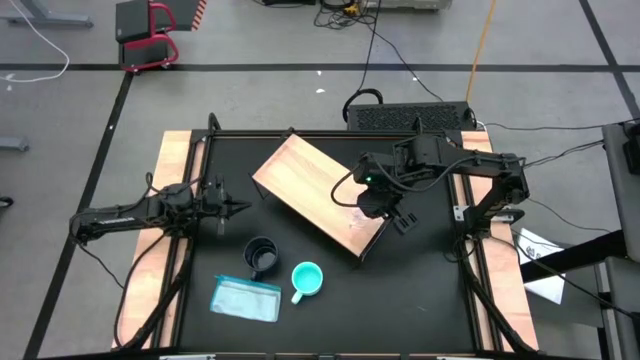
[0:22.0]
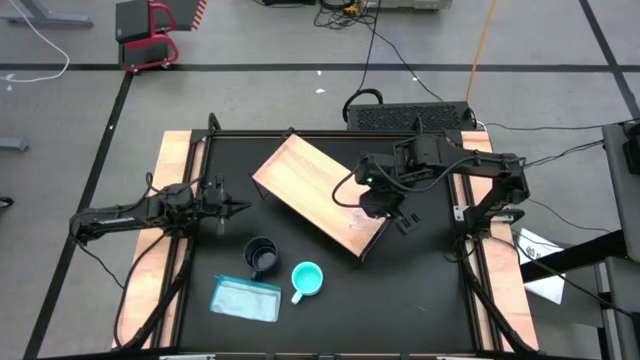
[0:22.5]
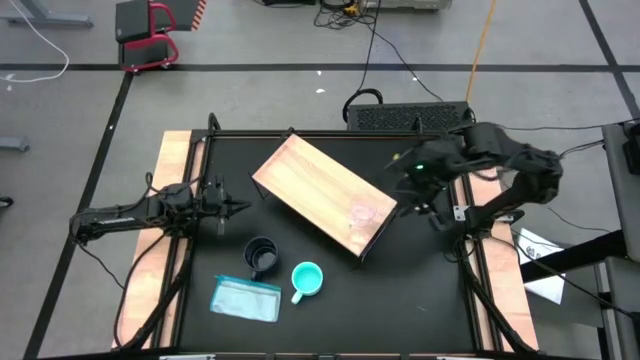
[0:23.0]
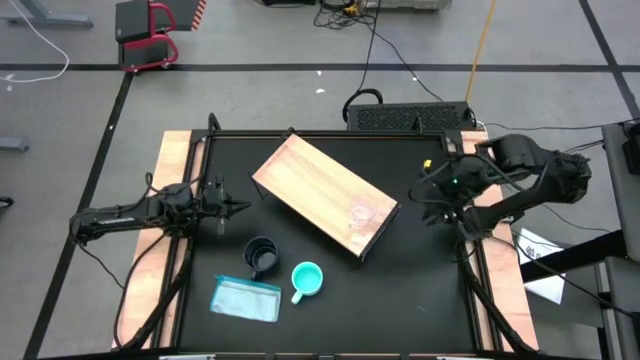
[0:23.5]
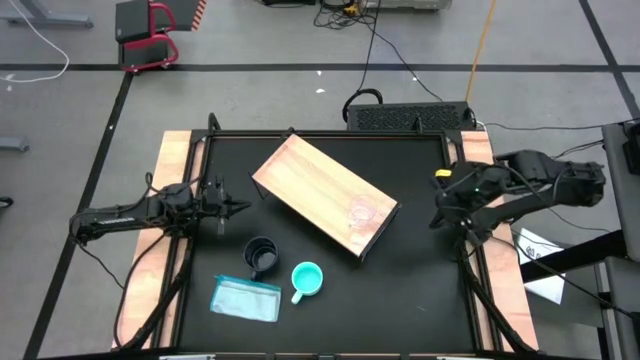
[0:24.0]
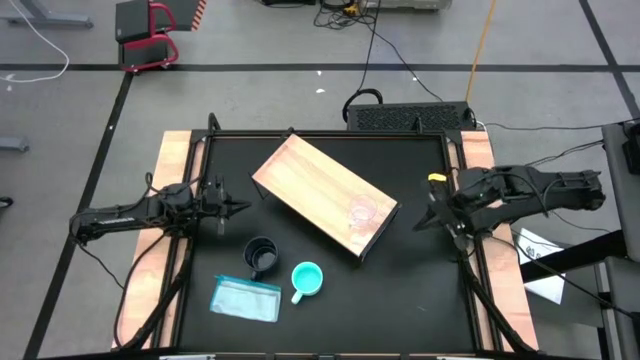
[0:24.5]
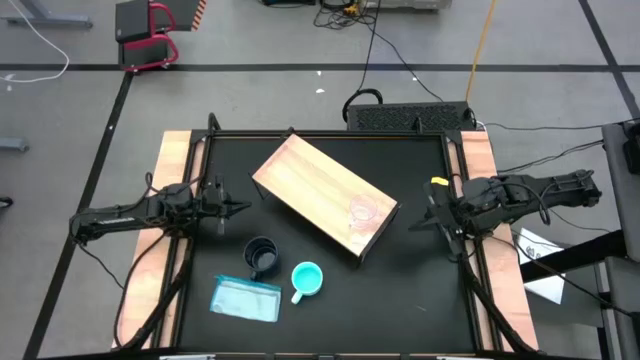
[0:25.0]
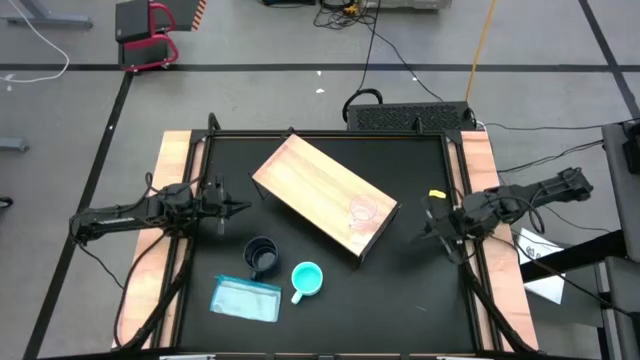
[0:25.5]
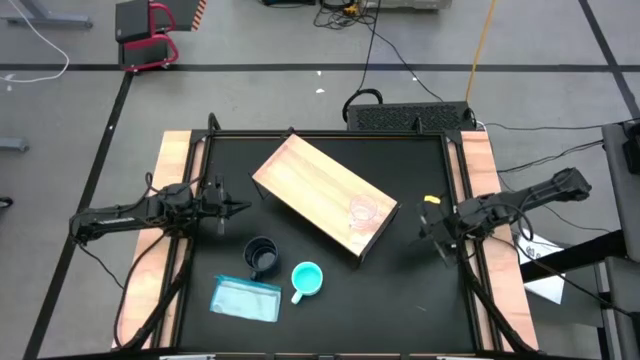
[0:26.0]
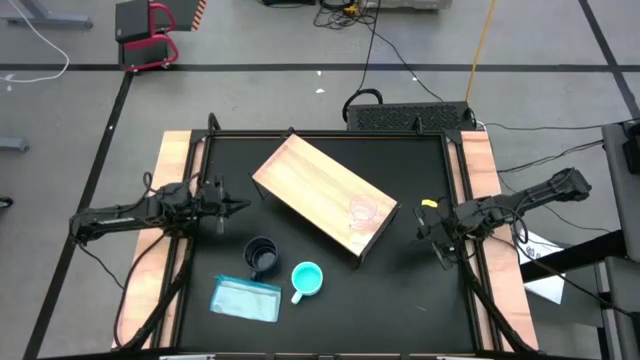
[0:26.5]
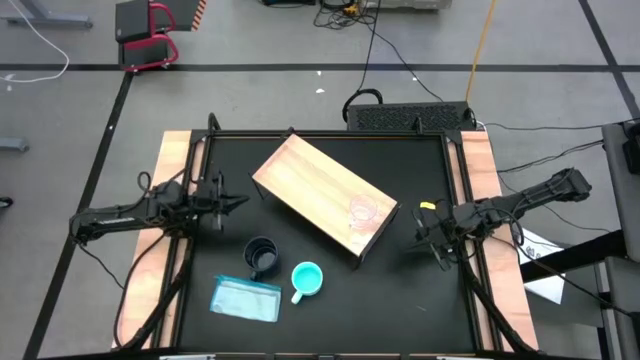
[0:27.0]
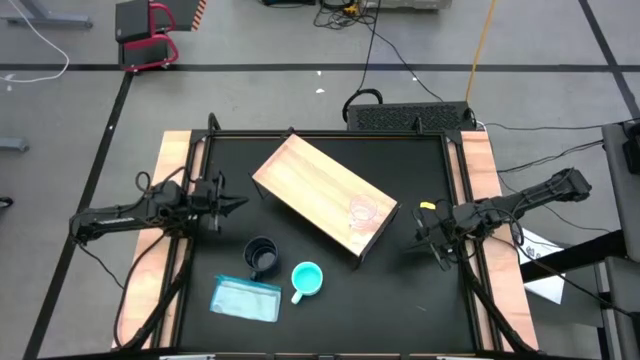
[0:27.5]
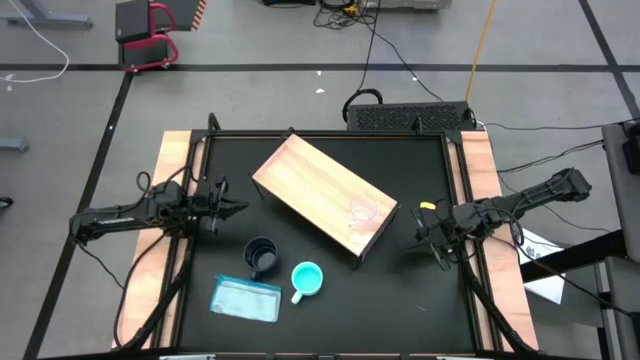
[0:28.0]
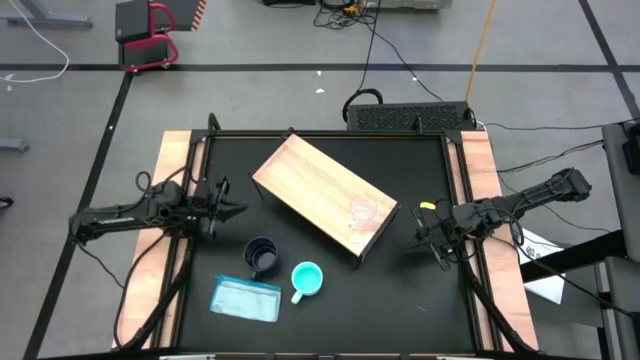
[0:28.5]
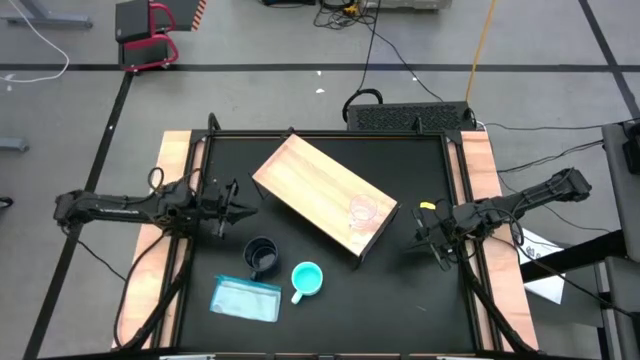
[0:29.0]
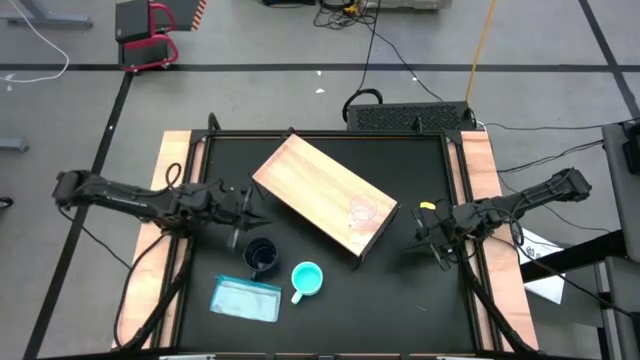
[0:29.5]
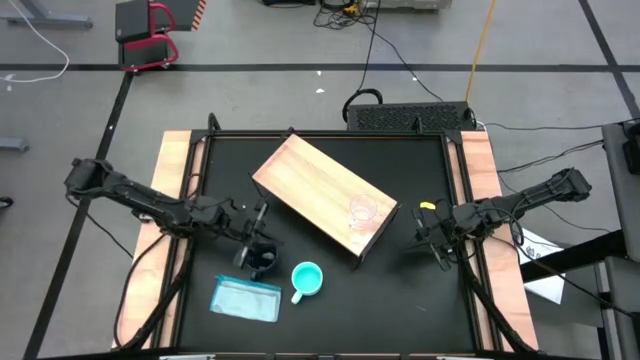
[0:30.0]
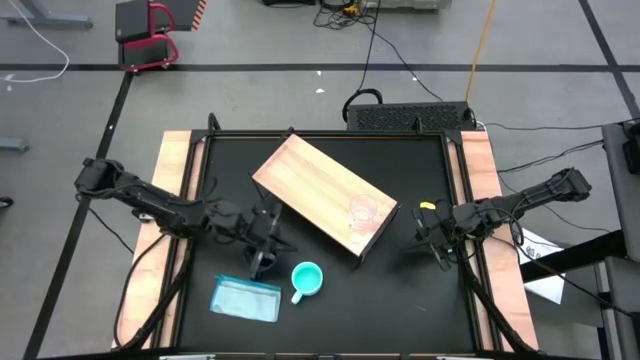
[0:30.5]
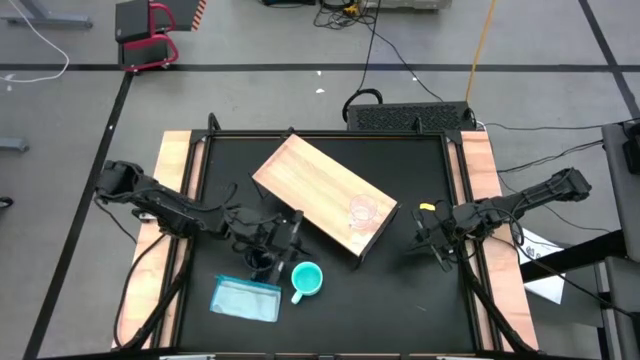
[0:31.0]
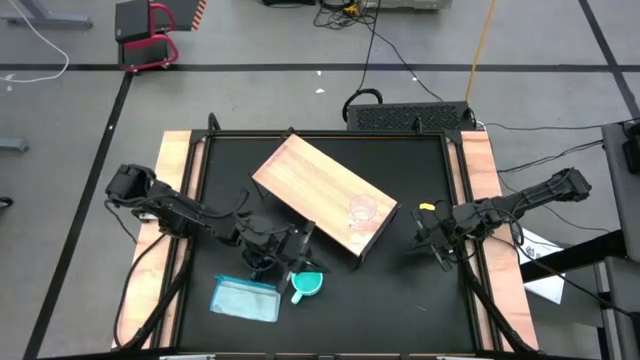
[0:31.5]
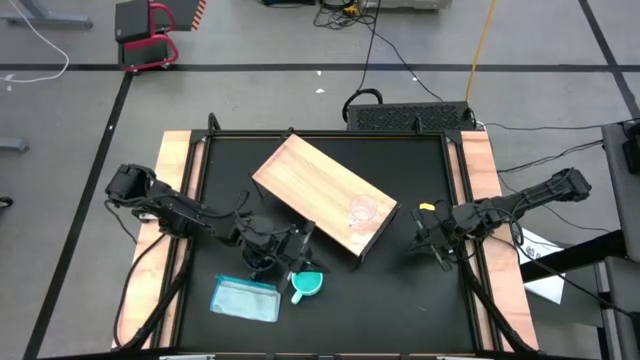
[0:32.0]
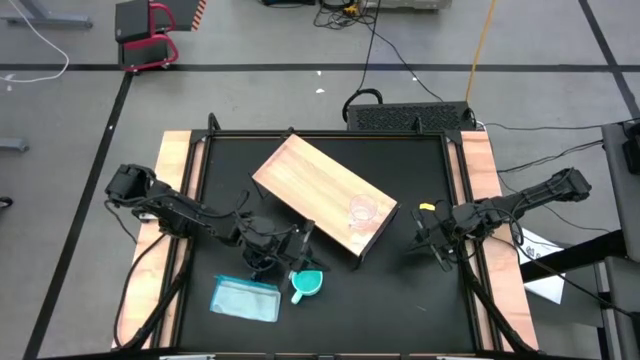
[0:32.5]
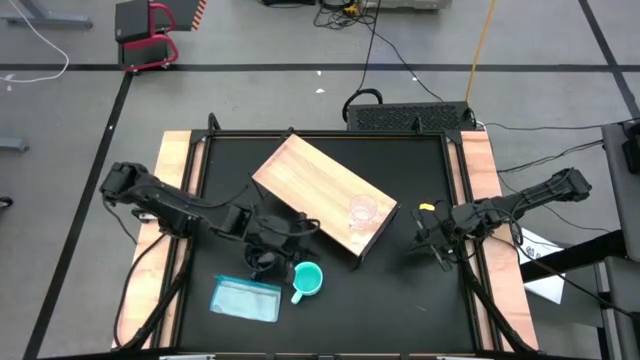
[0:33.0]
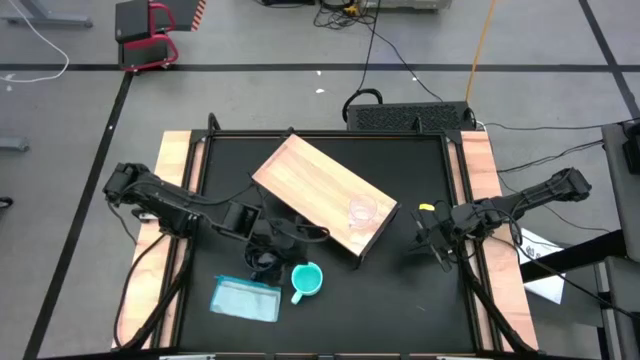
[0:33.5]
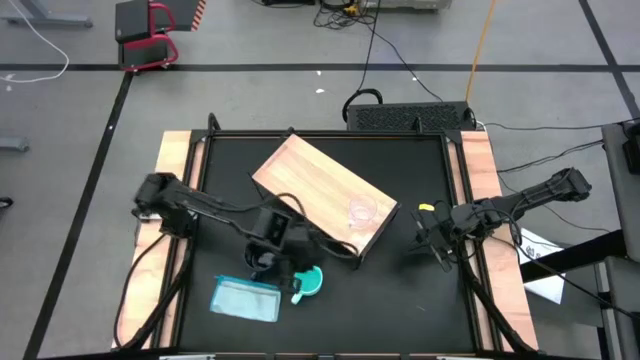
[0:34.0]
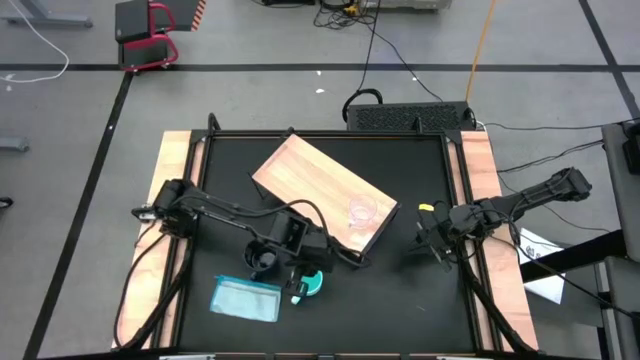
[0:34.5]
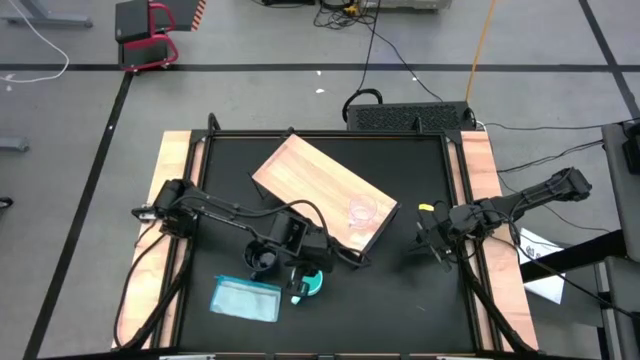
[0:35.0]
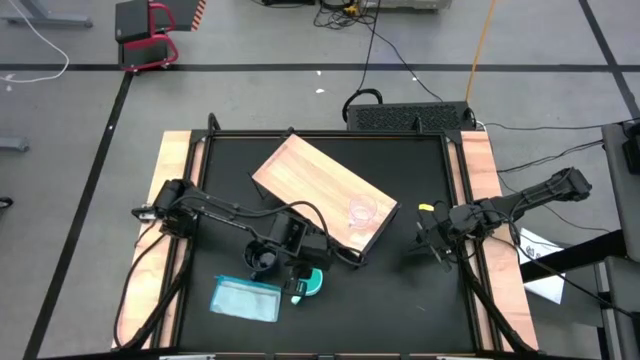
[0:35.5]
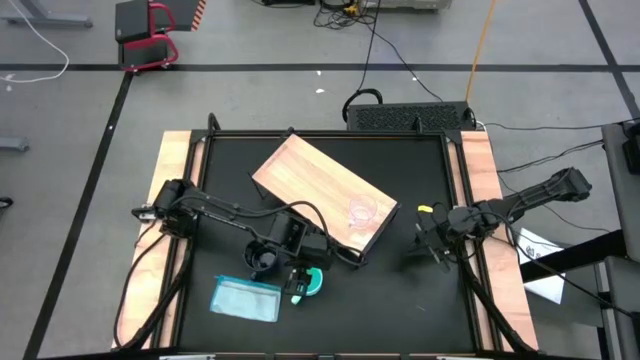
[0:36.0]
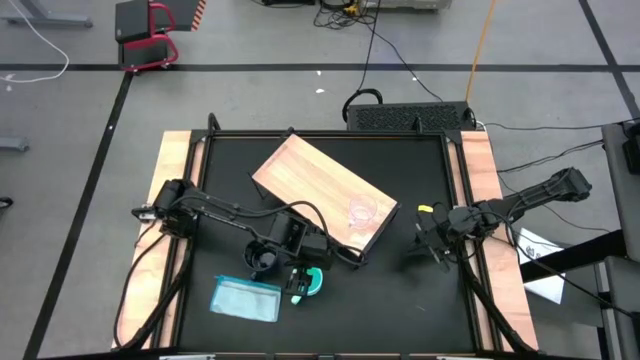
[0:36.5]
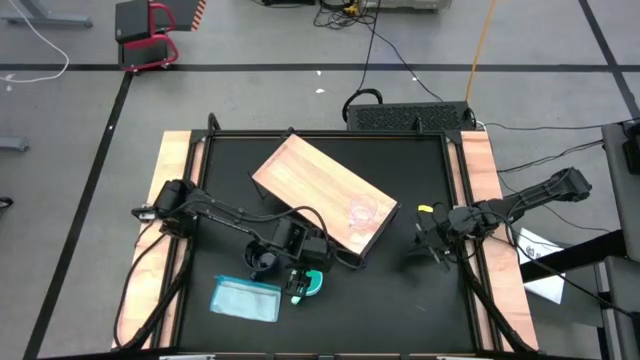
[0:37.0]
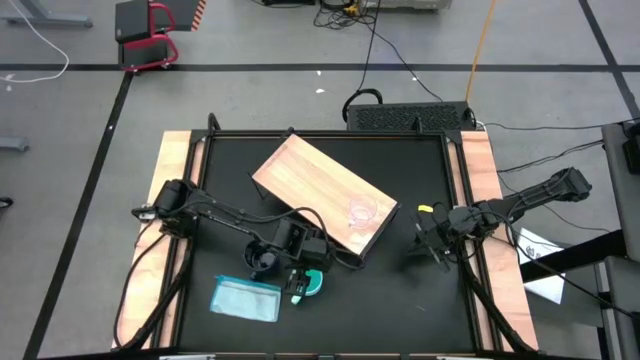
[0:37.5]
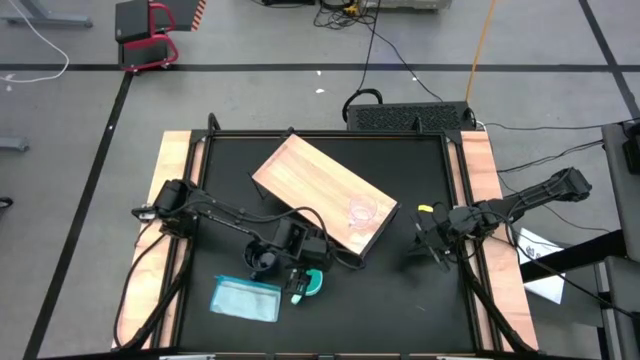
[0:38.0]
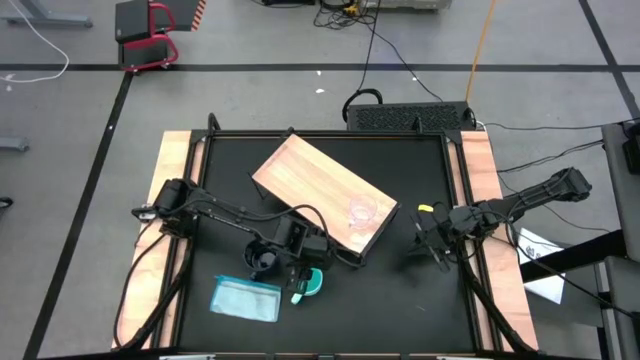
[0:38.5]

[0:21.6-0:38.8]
Task: Stack small to large cups/mugs on shelf
Put the light blue mug on the shelf

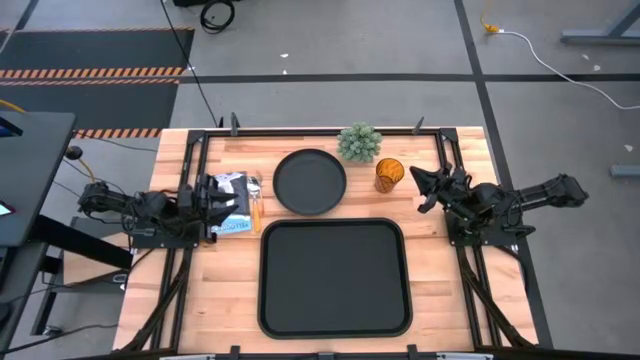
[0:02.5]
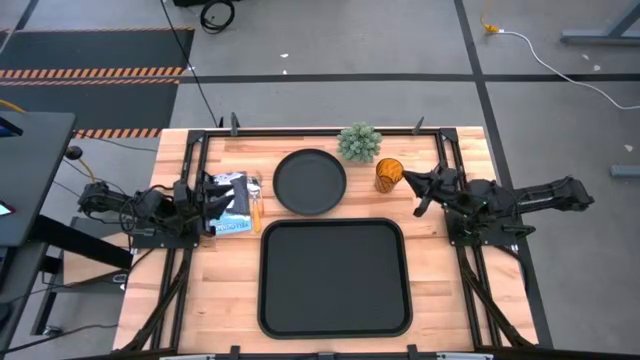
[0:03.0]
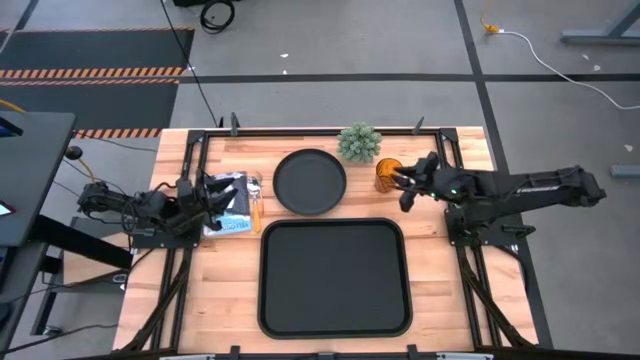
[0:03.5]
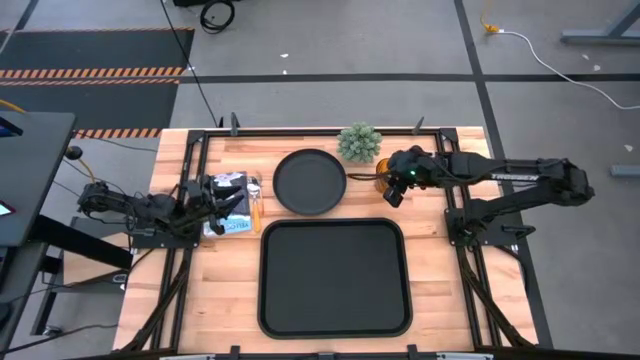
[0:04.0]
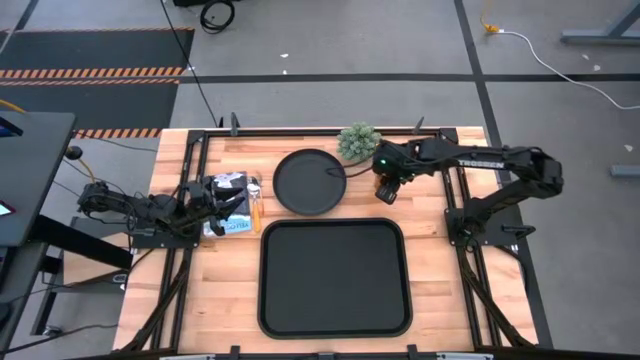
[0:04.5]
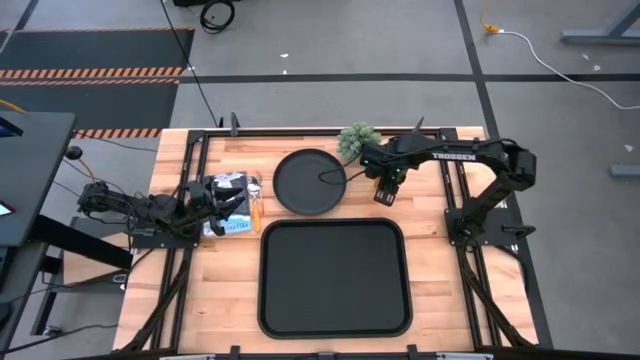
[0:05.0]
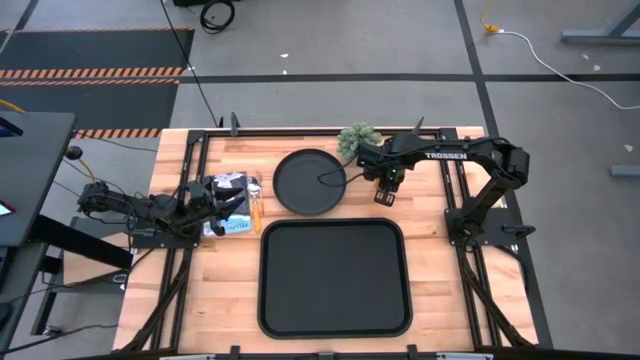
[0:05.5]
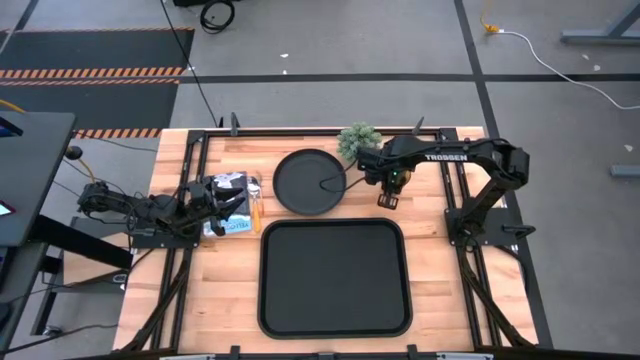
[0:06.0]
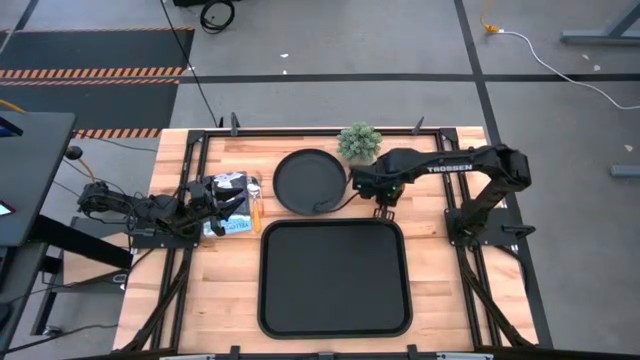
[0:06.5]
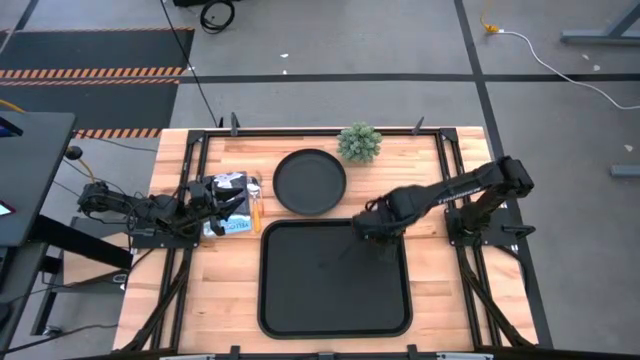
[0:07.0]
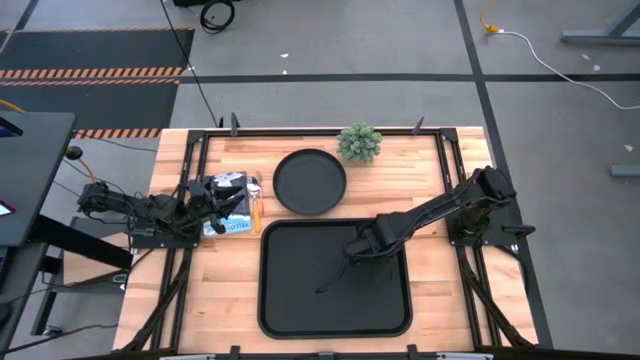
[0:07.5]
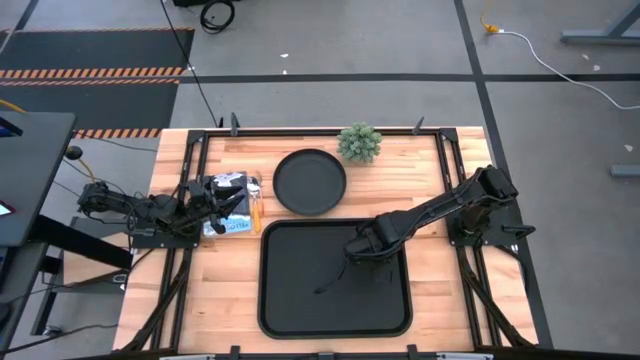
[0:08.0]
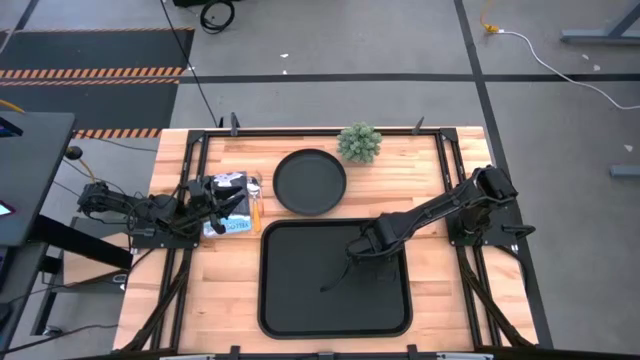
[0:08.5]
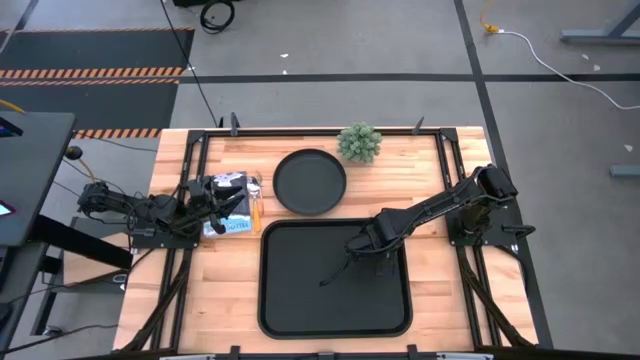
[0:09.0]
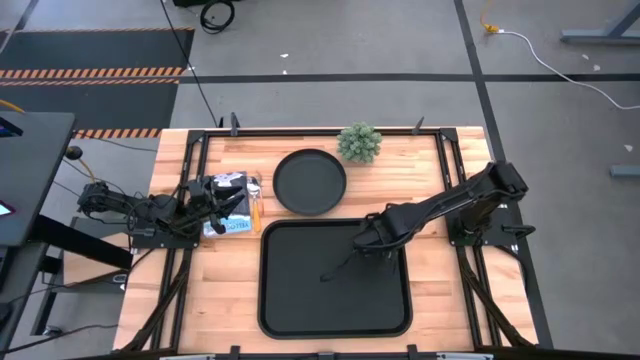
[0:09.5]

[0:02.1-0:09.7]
Task: Pick and place plate/cup/fork/spoon on tray
Put the orange glass on the black serving tray
